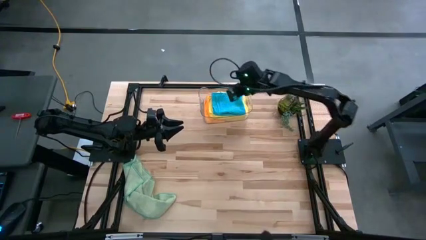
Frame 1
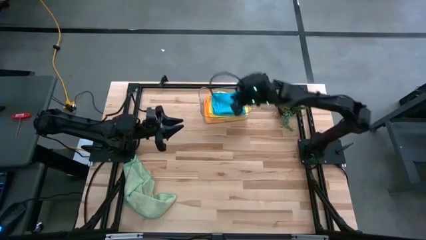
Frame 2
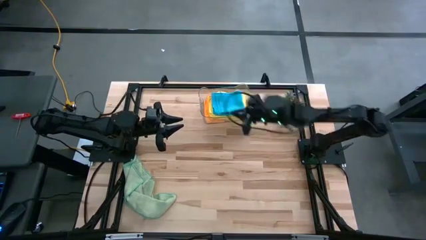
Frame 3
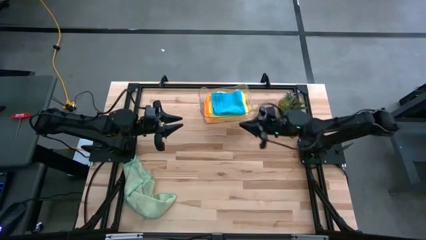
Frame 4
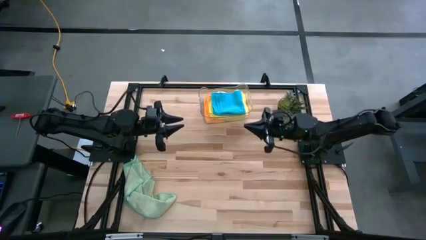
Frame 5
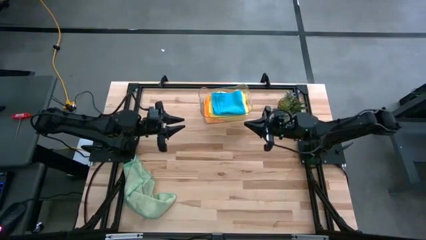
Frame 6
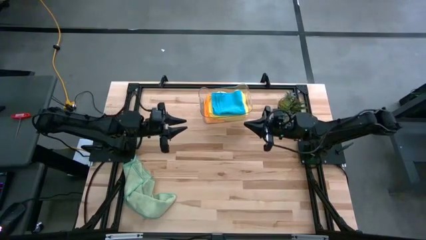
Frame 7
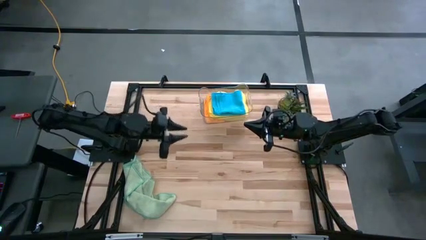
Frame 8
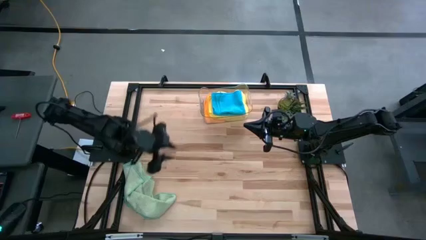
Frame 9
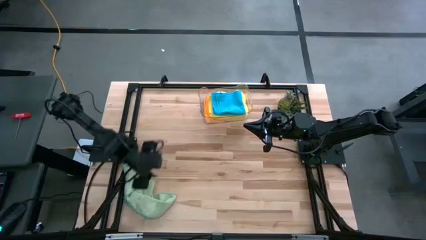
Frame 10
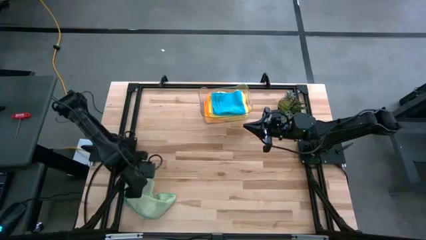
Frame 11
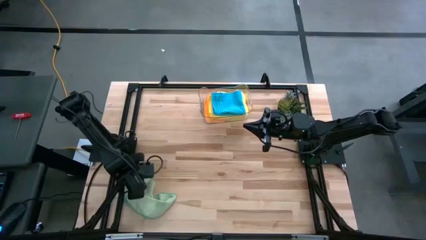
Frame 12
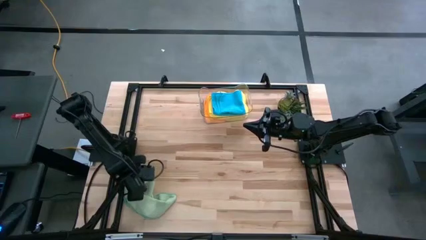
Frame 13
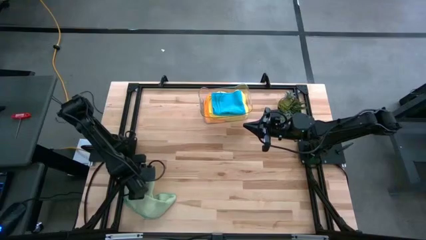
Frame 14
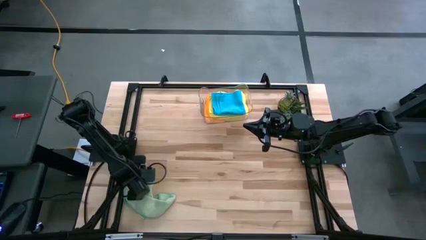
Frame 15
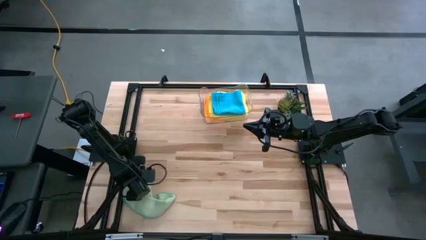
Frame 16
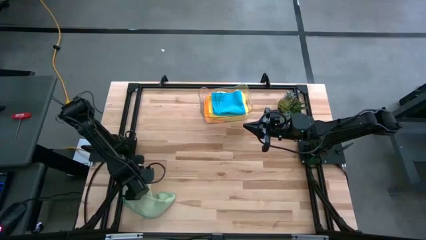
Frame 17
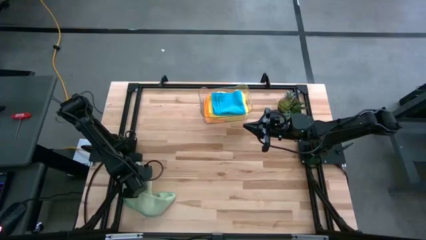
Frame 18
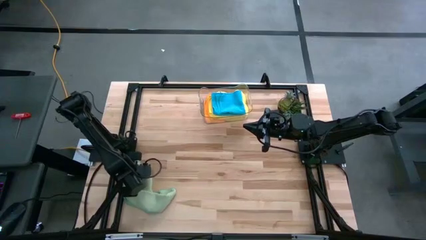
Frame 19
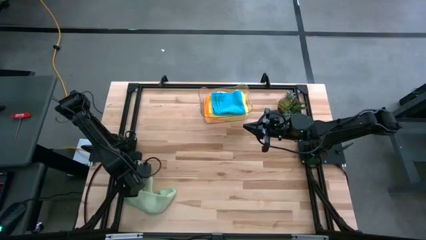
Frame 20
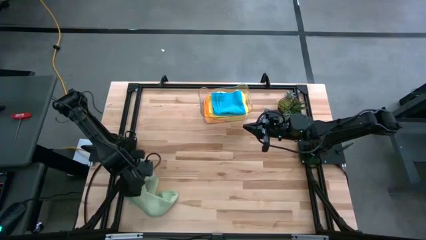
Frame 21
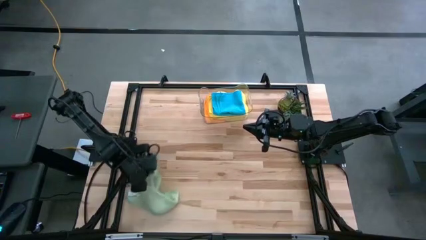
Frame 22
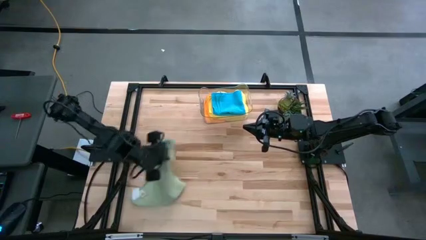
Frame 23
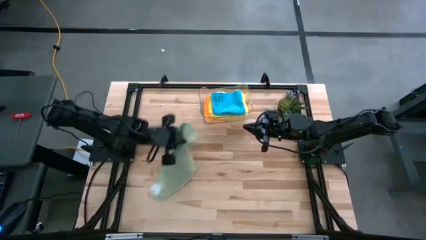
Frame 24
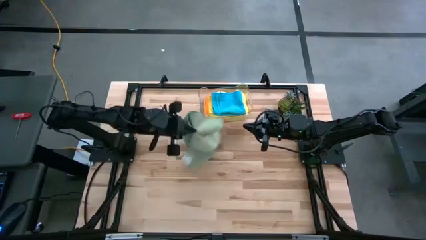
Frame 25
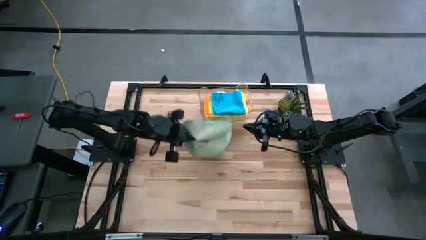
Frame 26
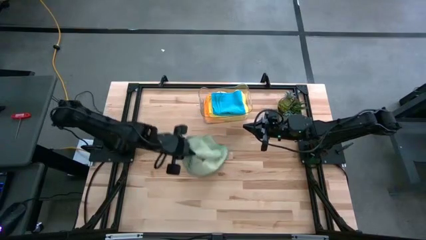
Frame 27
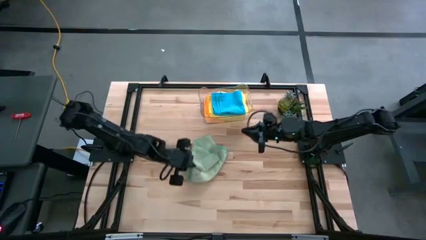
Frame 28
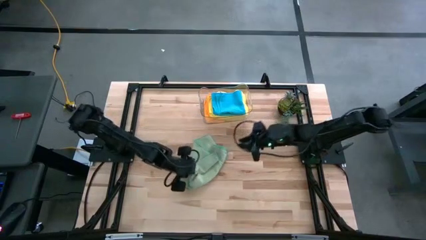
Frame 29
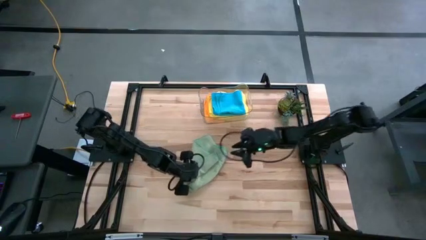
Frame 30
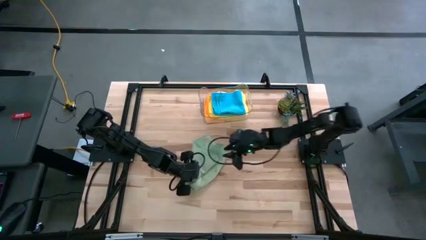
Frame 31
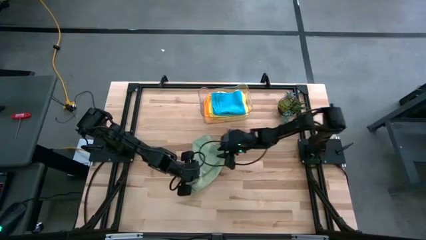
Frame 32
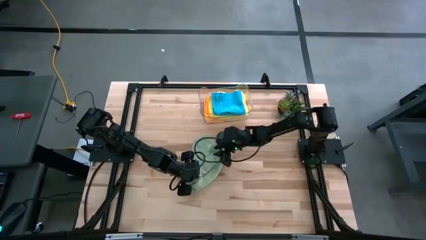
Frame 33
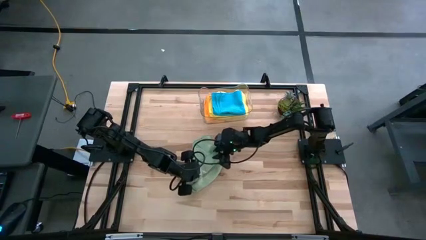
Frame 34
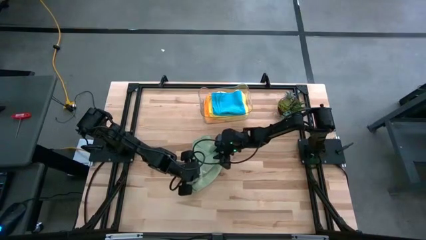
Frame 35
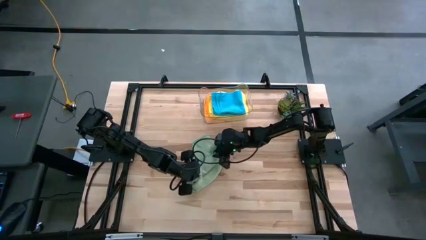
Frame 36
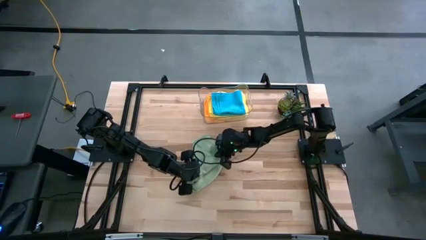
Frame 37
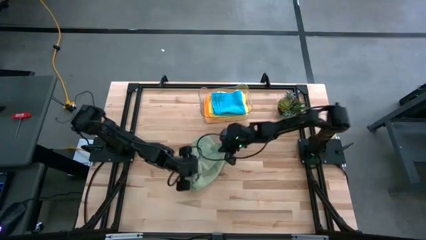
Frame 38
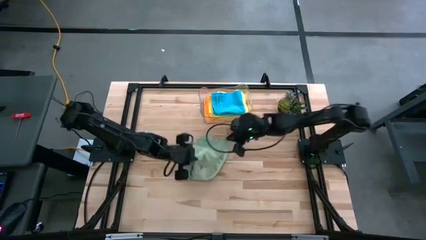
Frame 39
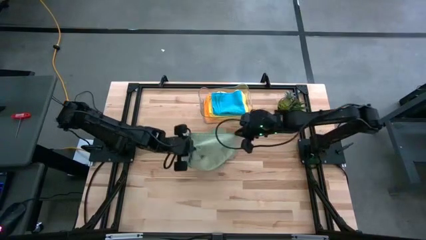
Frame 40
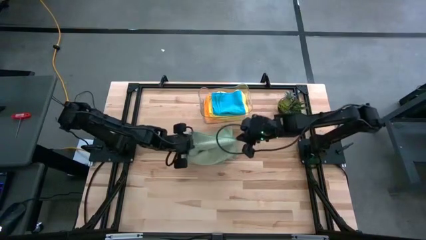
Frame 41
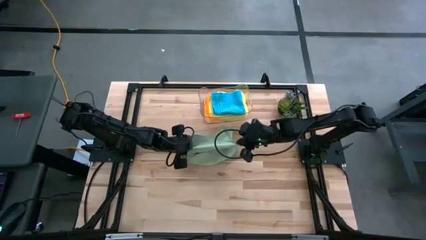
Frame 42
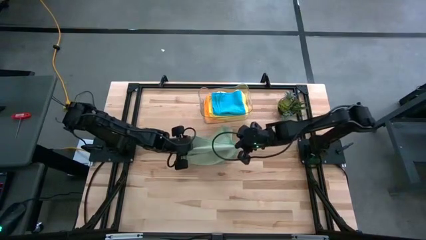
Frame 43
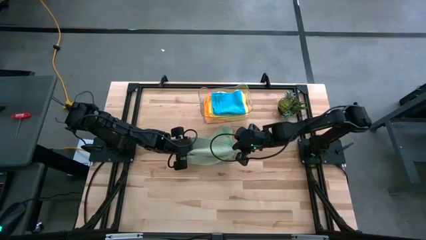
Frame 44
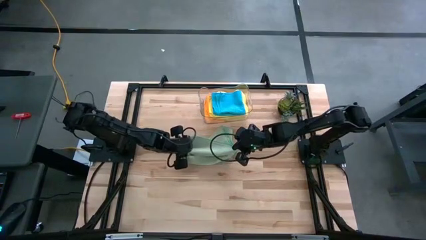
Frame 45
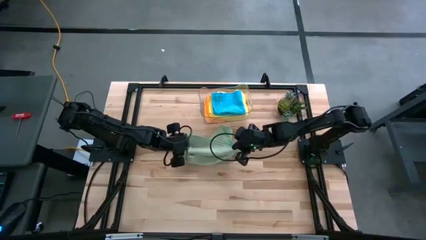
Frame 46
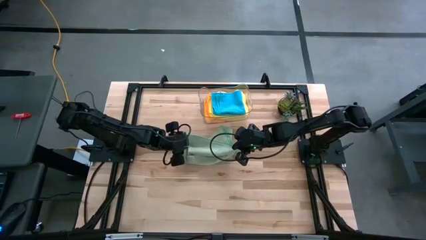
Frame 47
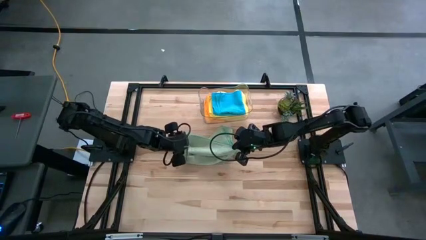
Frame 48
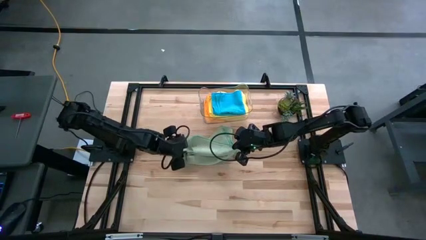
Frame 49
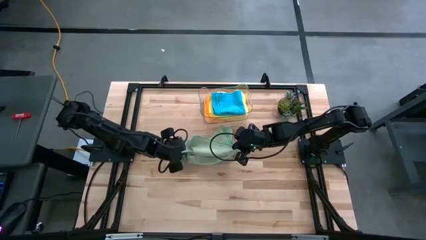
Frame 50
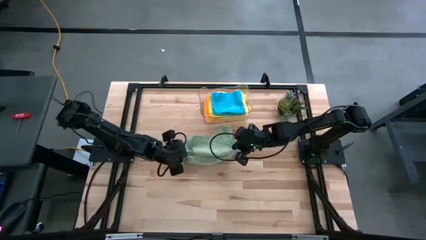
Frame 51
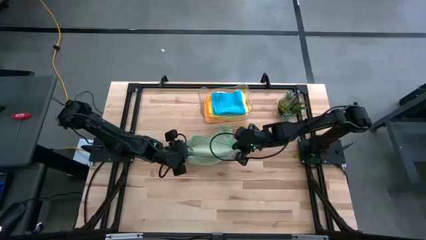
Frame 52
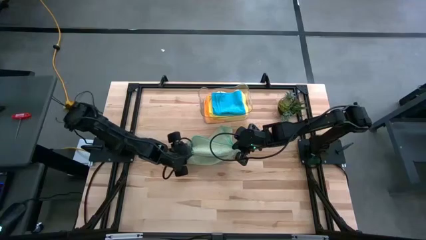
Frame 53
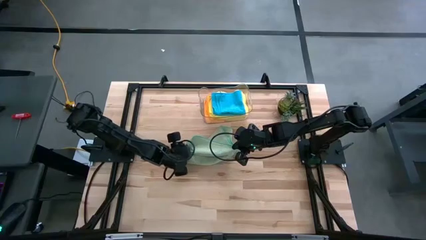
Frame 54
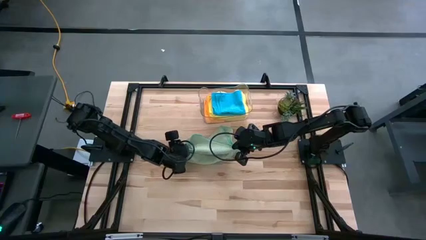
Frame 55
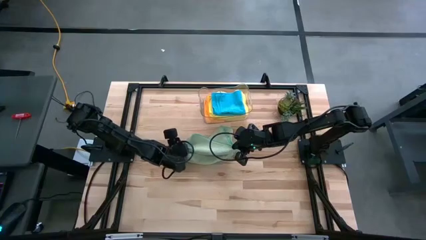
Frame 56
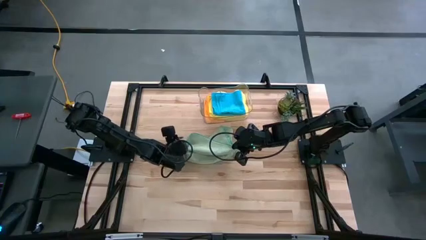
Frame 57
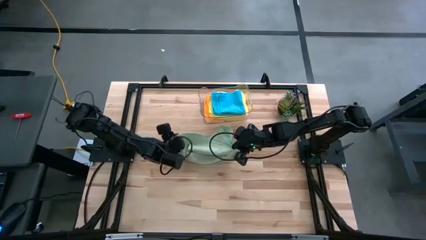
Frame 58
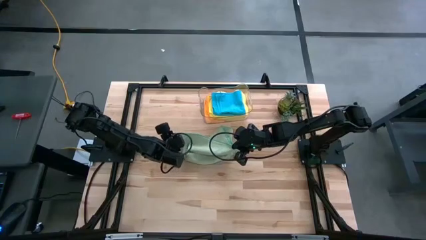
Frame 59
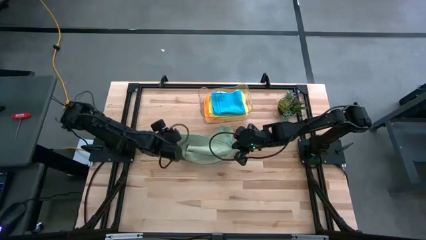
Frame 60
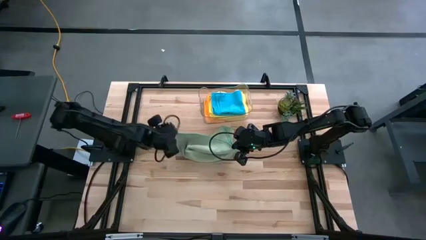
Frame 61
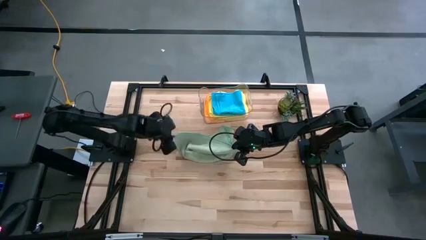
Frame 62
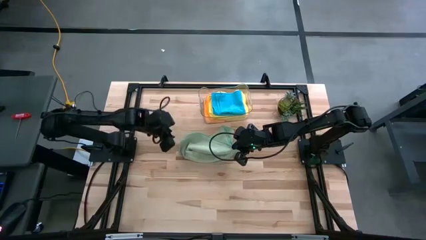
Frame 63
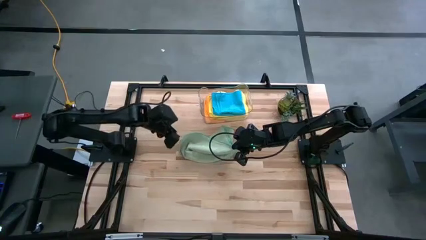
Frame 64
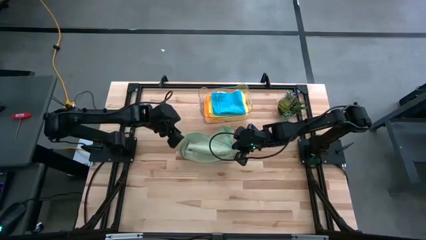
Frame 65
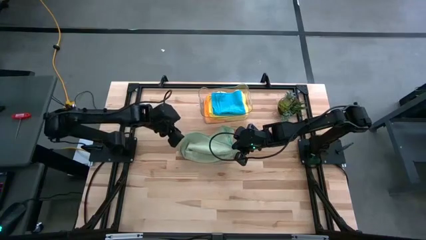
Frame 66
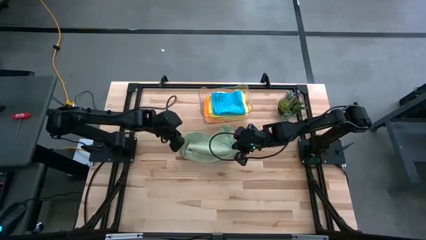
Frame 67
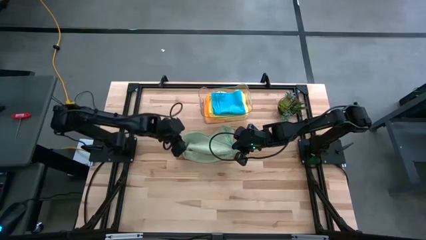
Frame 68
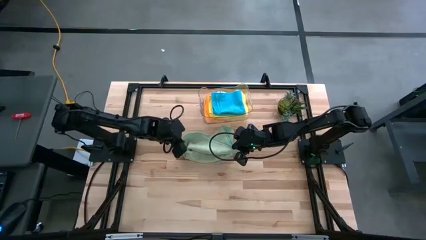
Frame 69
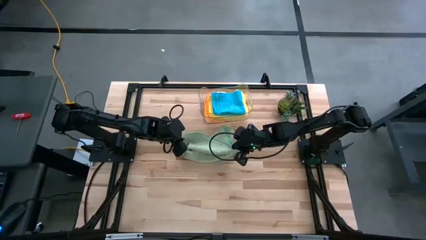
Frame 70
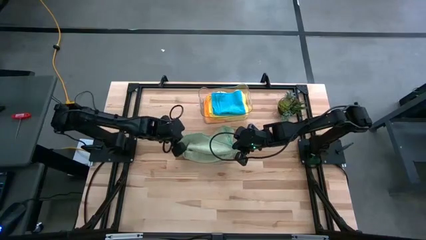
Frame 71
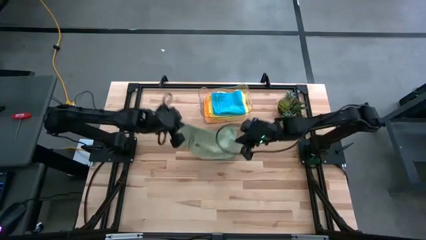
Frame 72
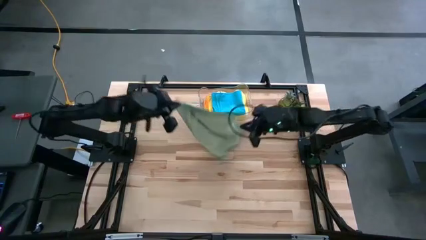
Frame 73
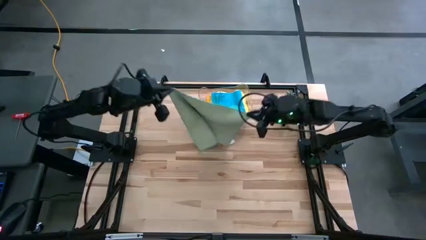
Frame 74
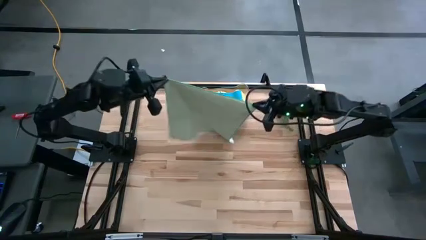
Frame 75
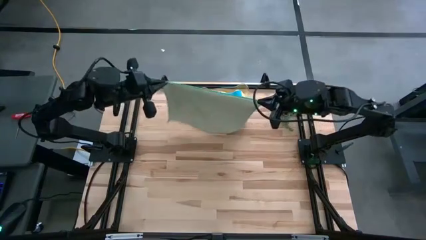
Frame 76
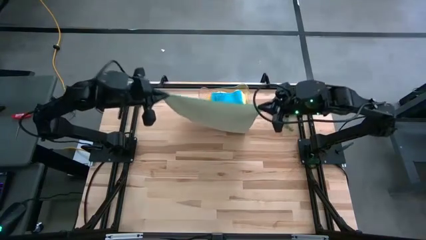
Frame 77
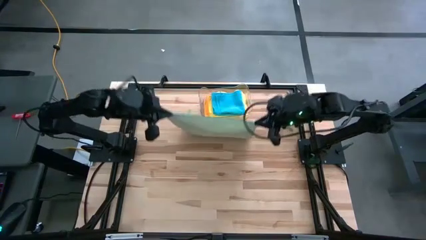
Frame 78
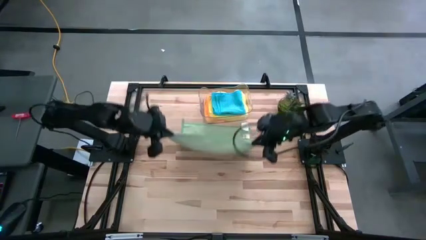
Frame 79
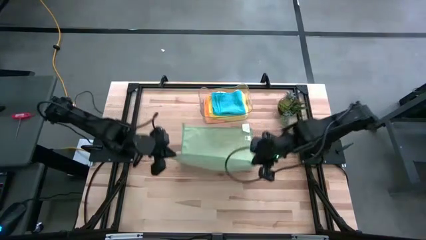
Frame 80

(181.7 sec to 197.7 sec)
Task: Fold microfiber towels
Fold the light green microfiber towel

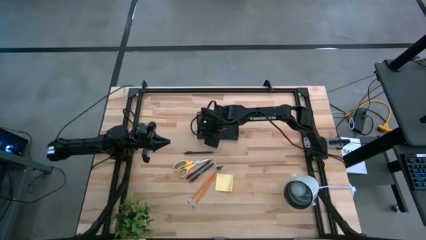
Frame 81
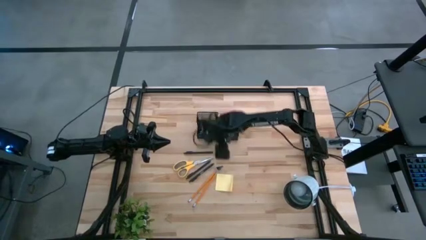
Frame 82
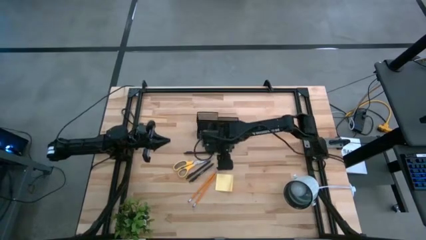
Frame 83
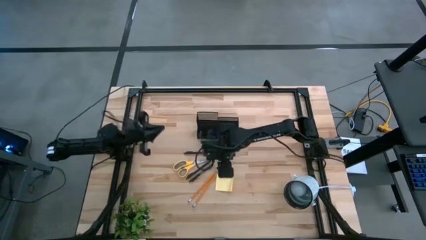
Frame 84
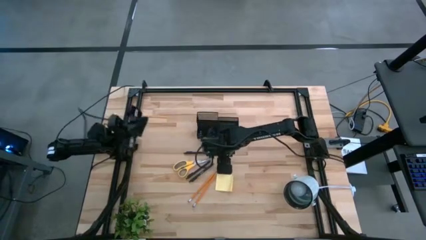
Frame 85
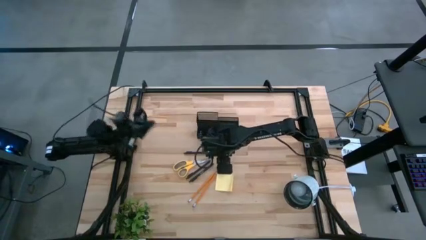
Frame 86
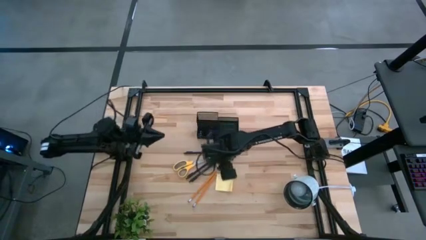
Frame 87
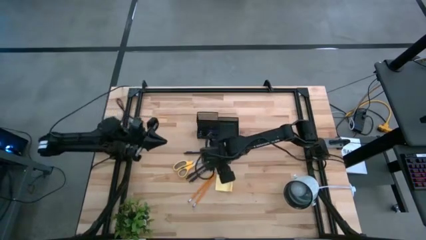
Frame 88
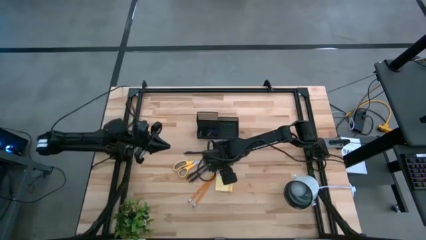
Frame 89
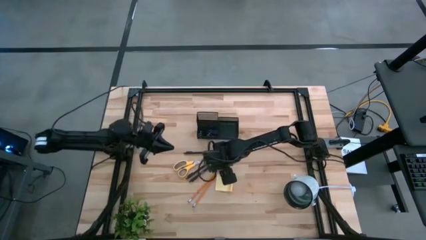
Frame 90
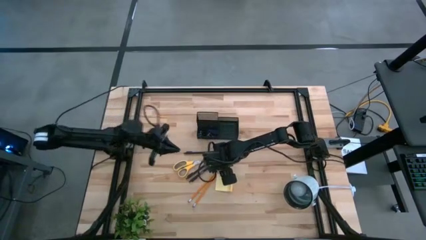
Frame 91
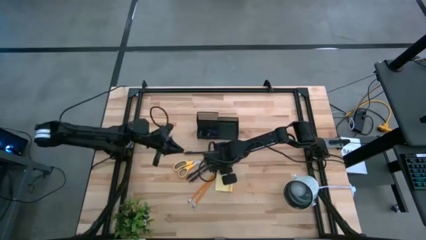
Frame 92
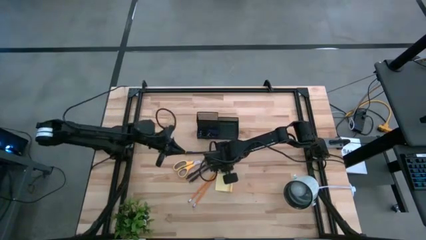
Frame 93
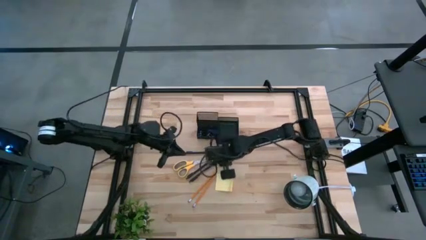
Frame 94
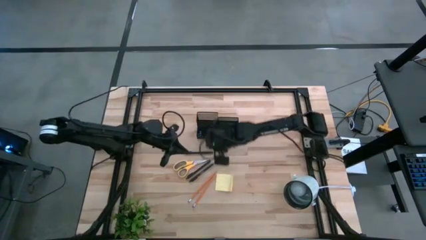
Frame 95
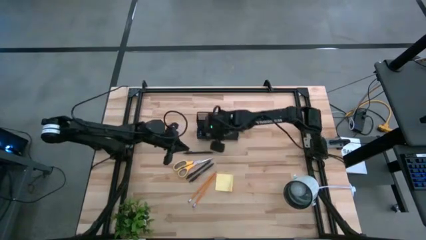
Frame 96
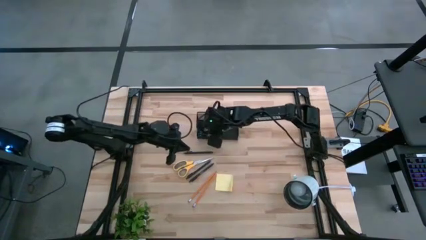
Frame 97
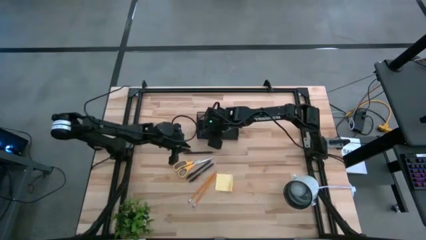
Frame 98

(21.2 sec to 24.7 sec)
Task: Pick and place office supplies into organizer
Put the black binder clip into the black organizer bin
